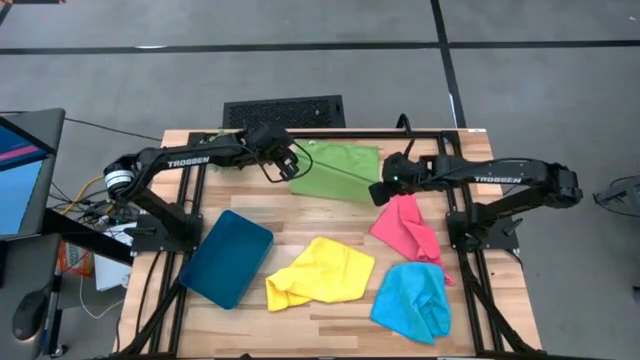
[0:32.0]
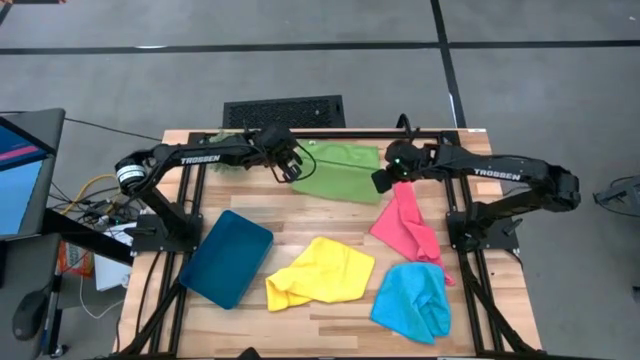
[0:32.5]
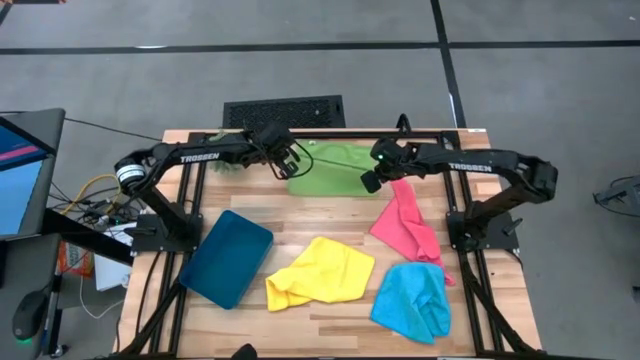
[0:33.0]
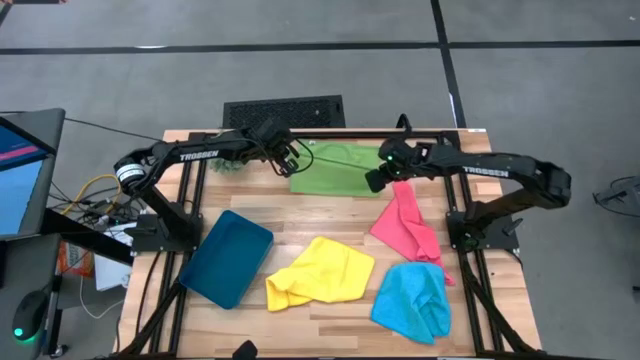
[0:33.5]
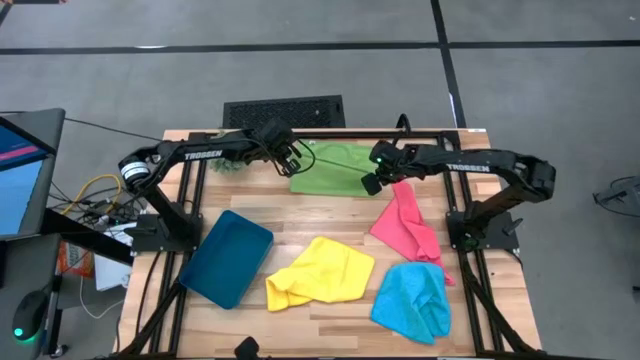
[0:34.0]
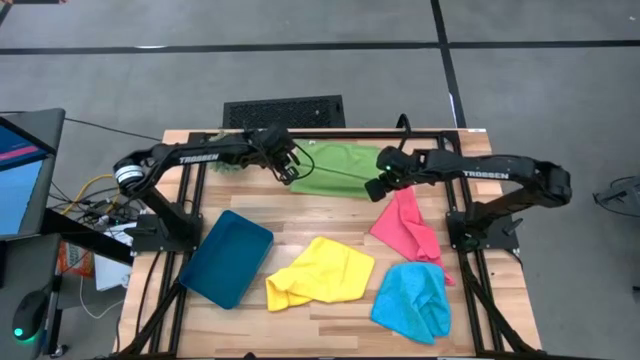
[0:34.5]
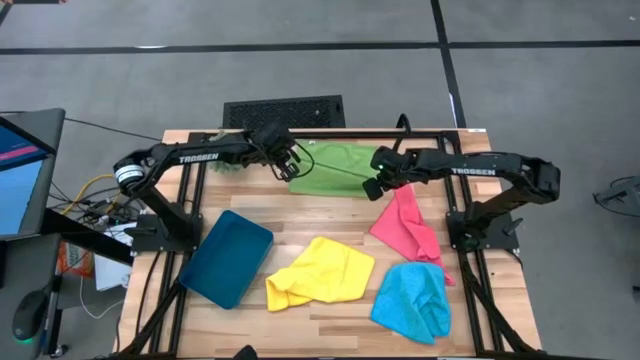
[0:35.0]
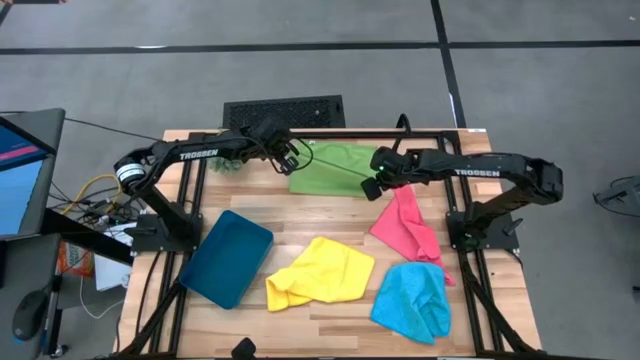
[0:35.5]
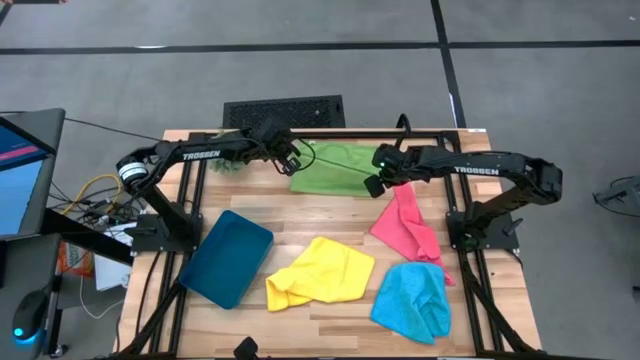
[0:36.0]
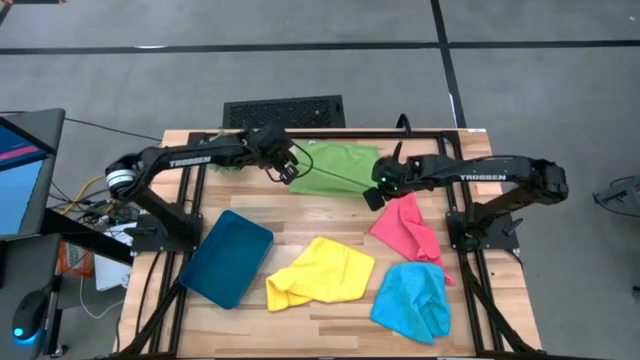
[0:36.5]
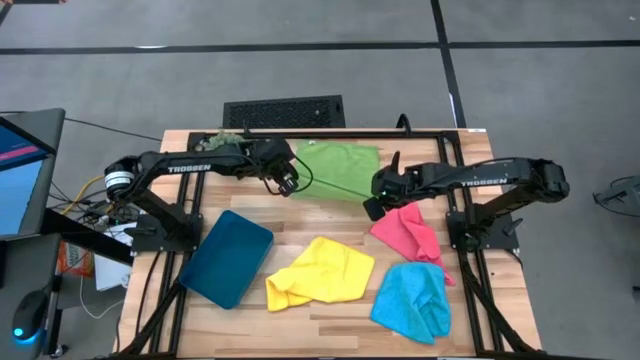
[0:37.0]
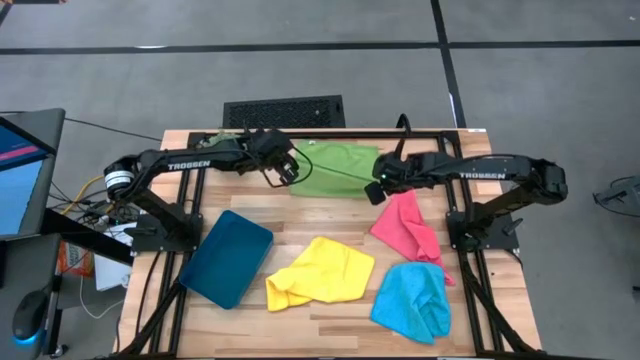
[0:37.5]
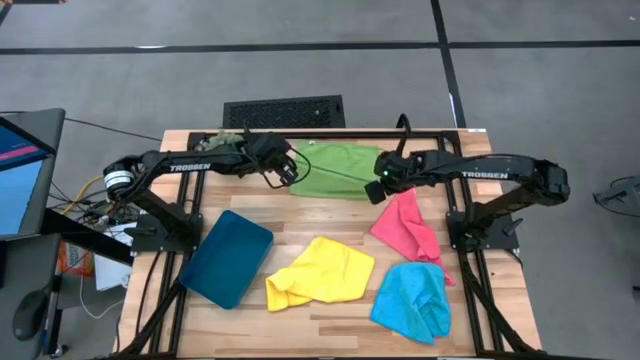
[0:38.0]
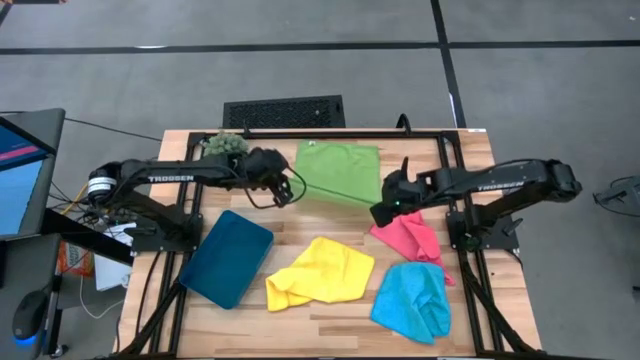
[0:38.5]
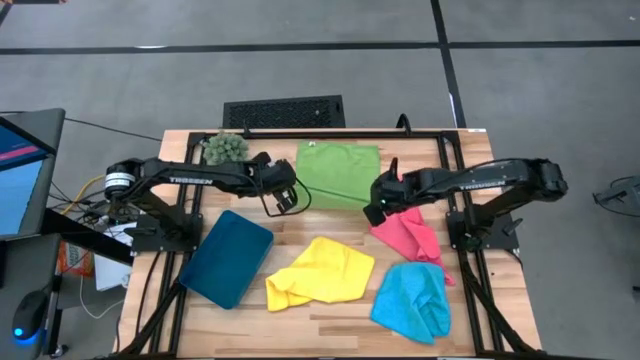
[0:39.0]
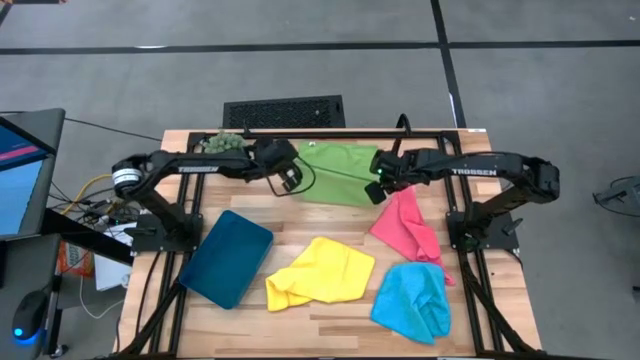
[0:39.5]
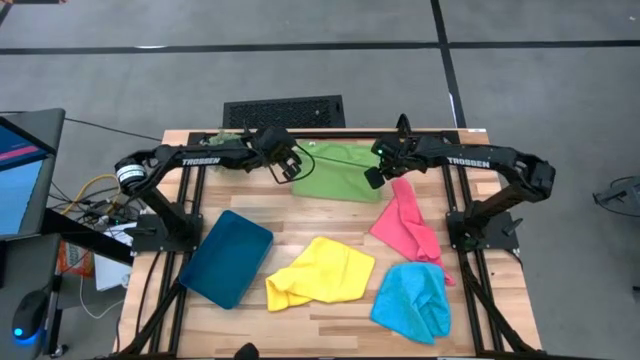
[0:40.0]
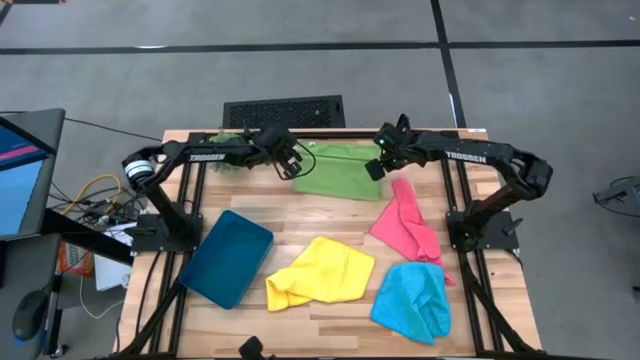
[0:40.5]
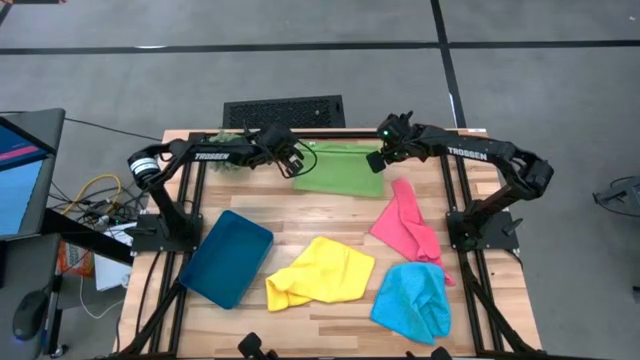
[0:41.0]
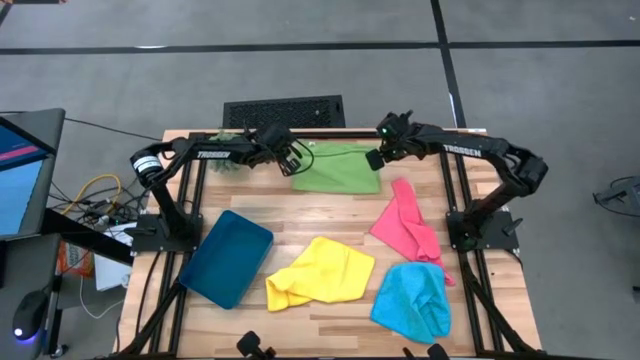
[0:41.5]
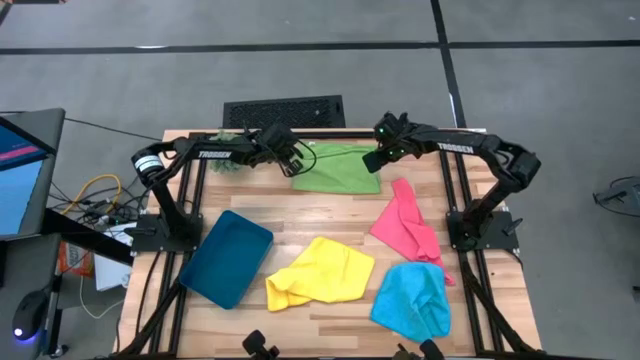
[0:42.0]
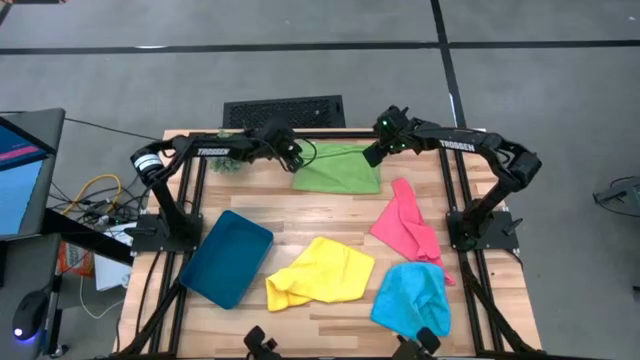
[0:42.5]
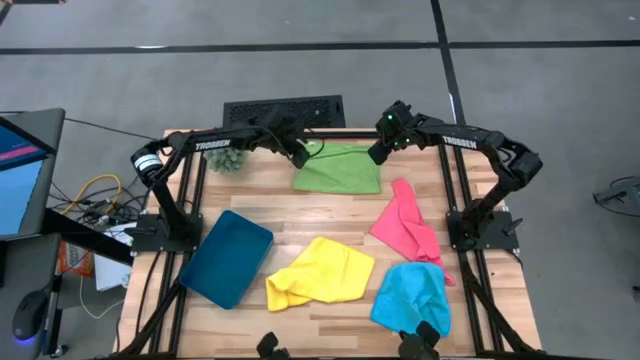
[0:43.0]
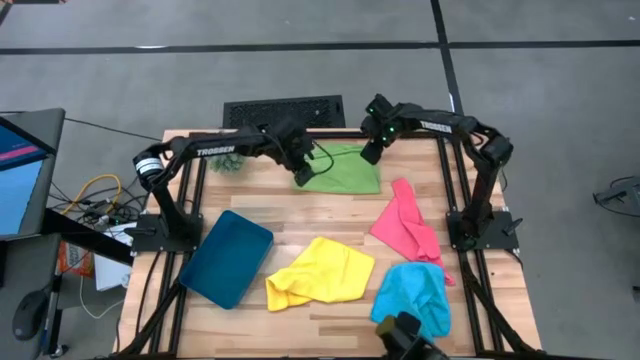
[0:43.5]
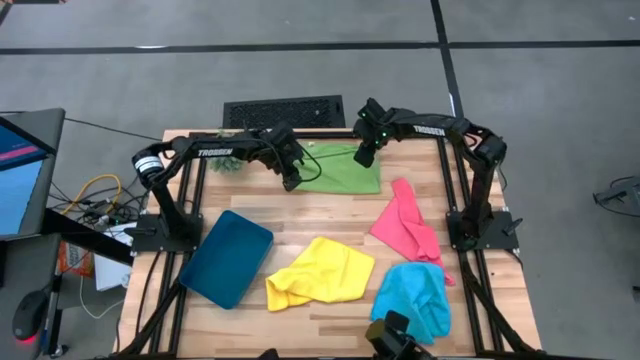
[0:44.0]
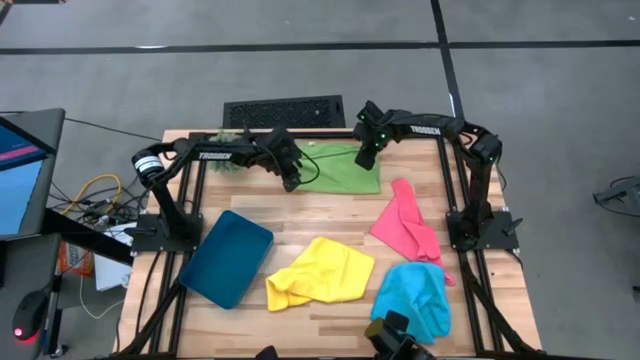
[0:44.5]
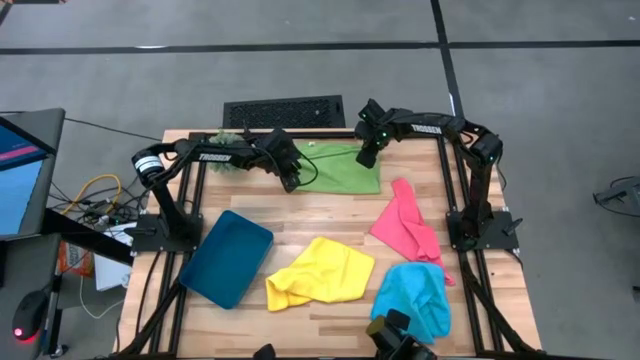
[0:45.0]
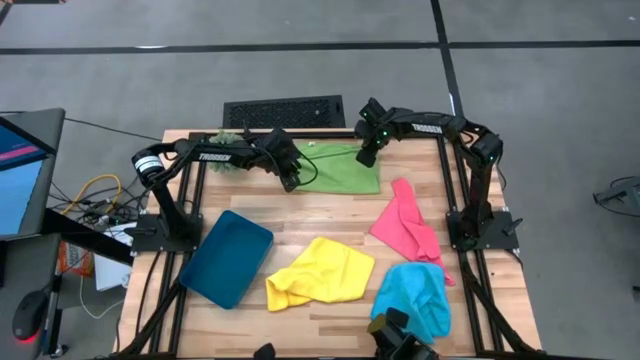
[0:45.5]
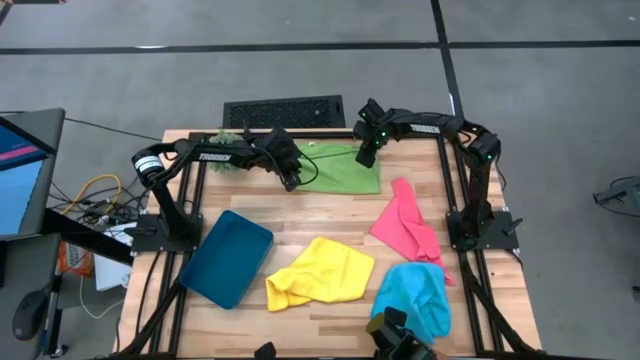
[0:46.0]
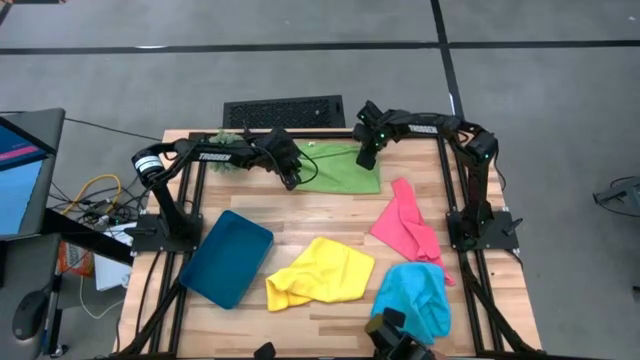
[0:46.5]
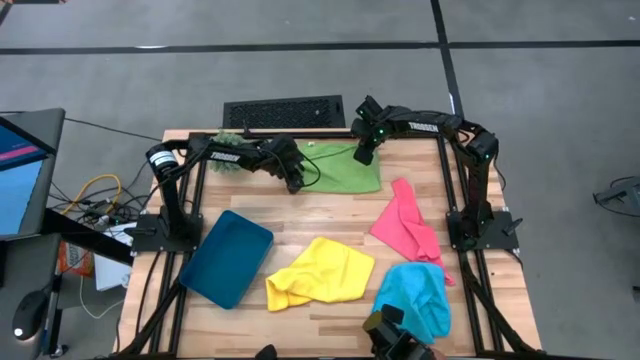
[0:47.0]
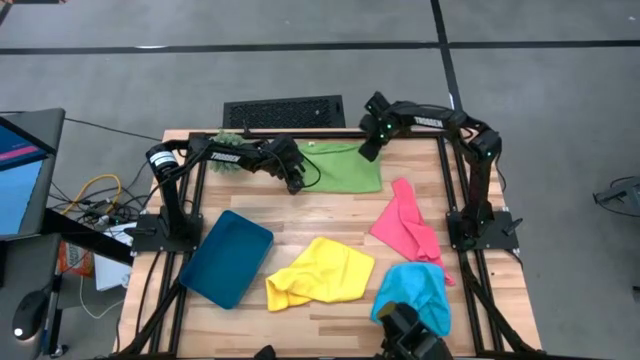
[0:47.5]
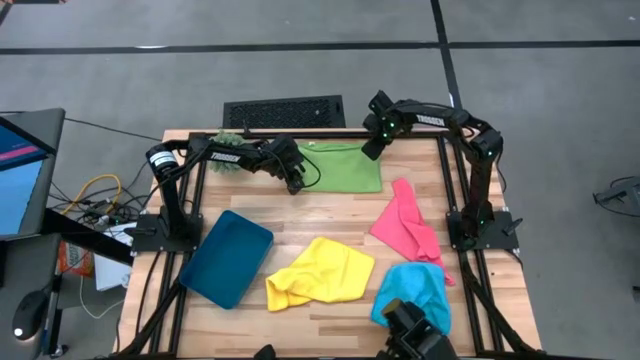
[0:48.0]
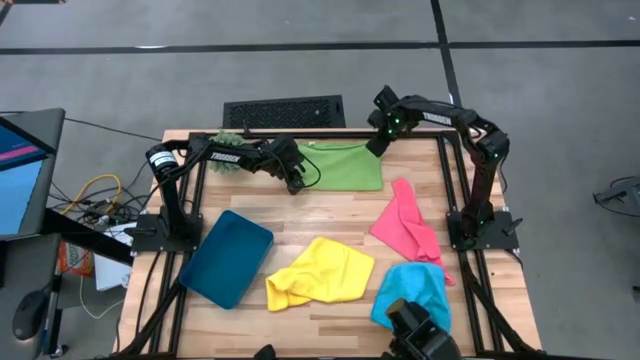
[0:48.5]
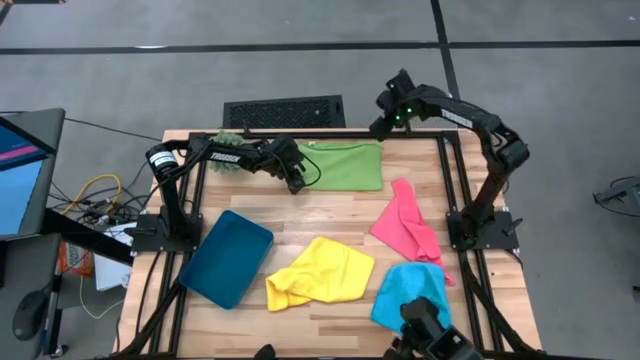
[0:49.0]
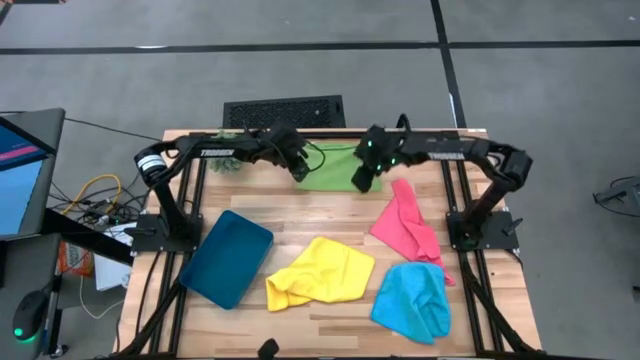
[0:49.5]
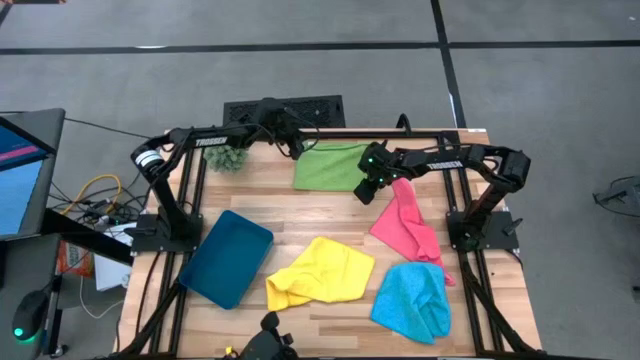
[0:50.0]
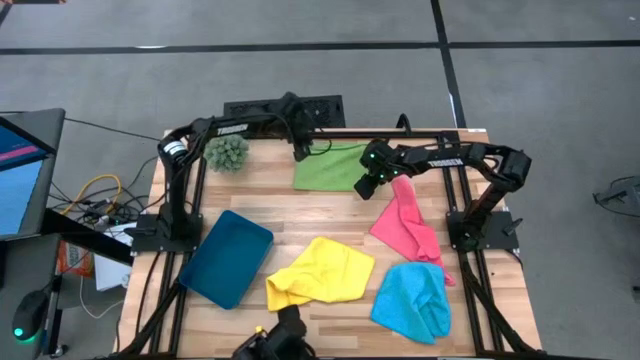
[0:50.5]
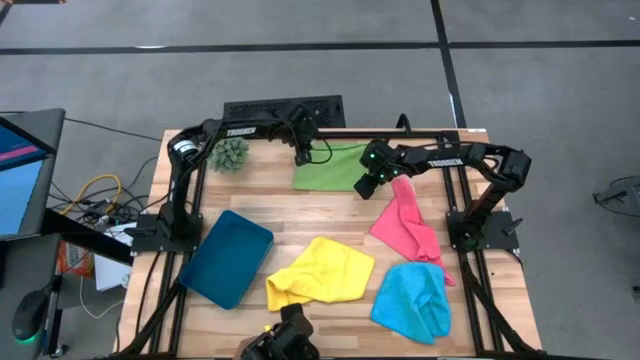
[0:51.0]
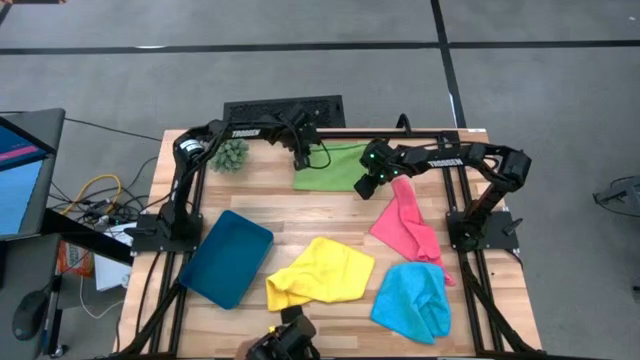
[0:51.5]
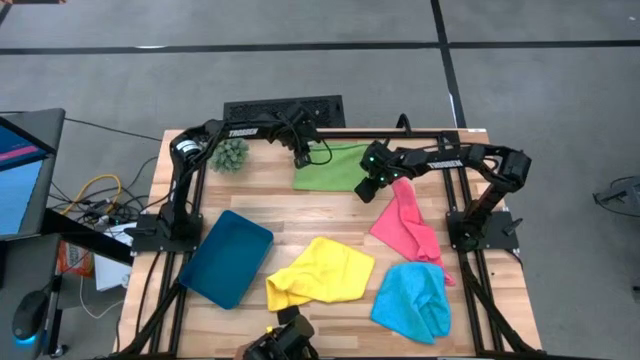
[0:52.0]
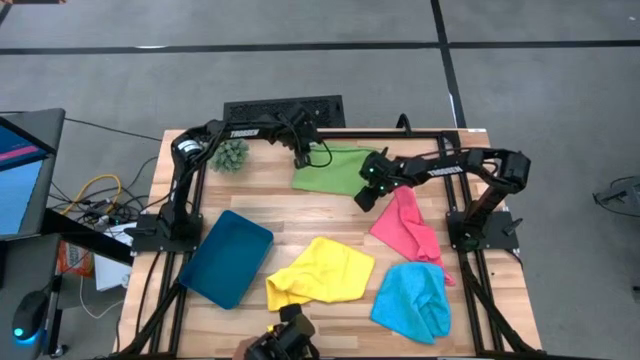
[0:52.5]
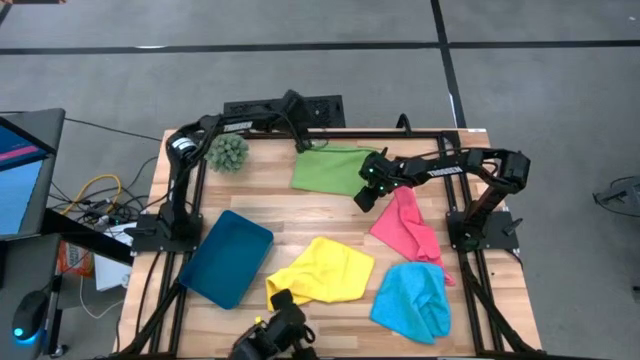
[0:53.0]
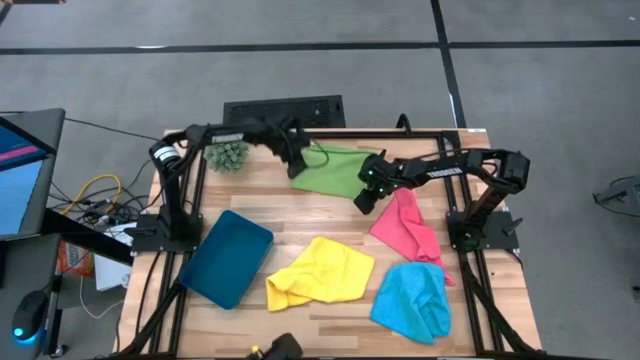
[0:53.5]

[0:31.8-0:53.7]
Task: Fold microfiber towels
Fold the green microfiber towel

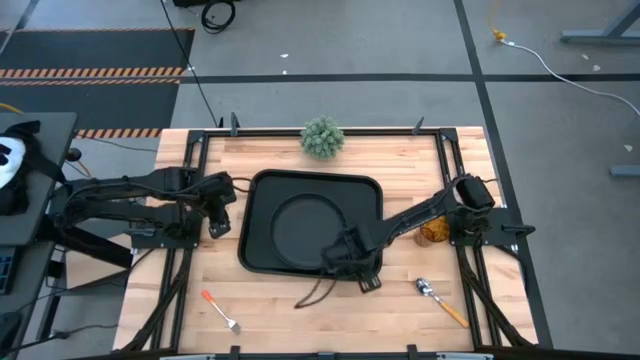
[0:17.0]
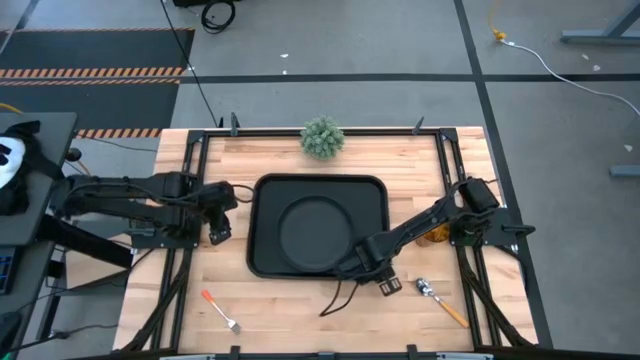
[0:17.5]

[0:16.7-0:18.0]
Task: Pick and place plate/cup/fork/spoon on tray
Adjust the black serving tray
